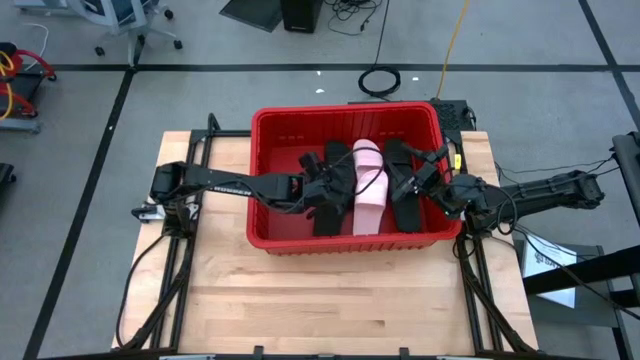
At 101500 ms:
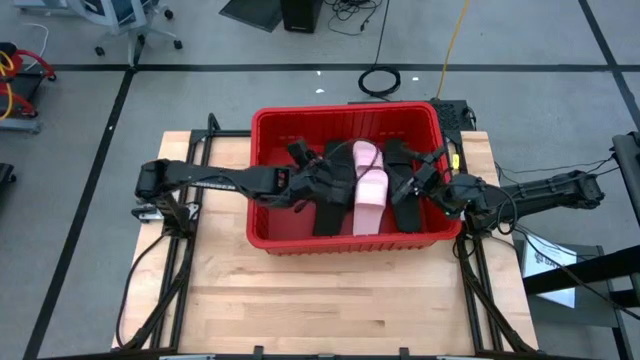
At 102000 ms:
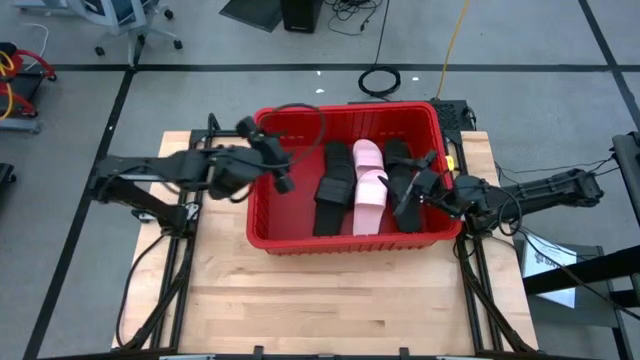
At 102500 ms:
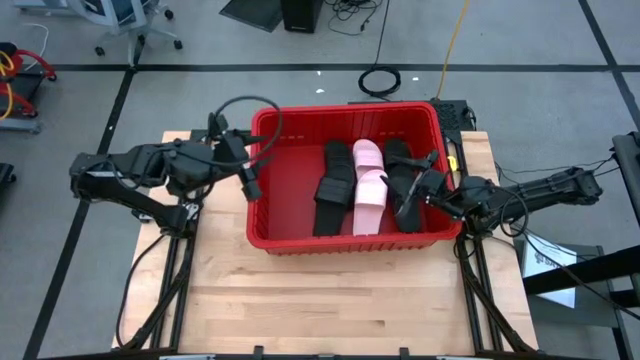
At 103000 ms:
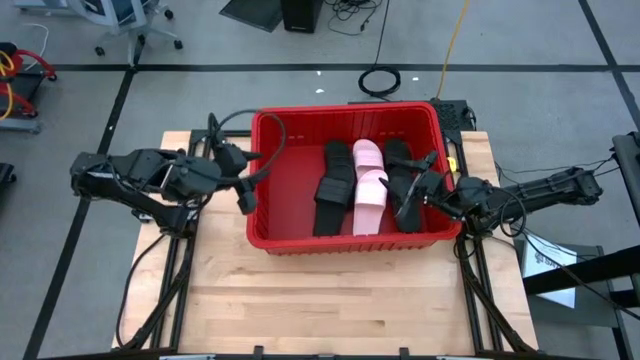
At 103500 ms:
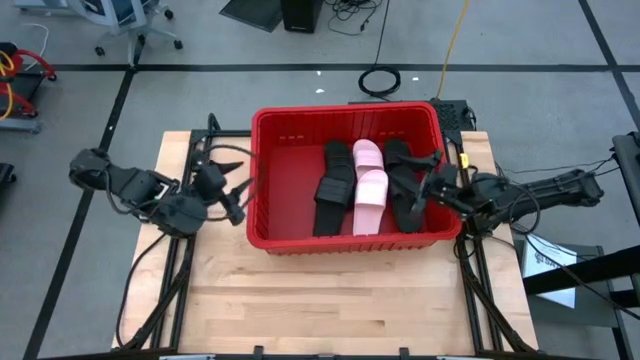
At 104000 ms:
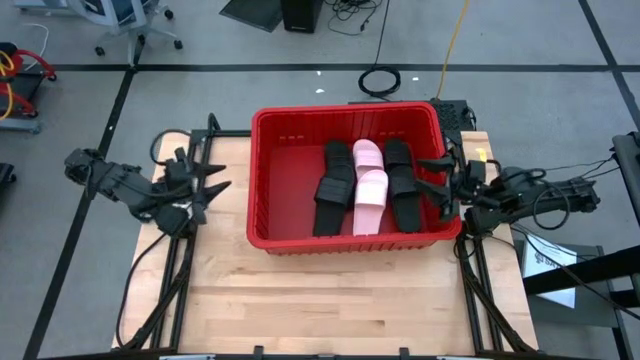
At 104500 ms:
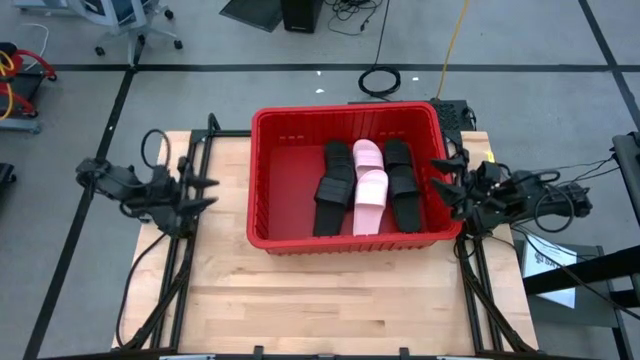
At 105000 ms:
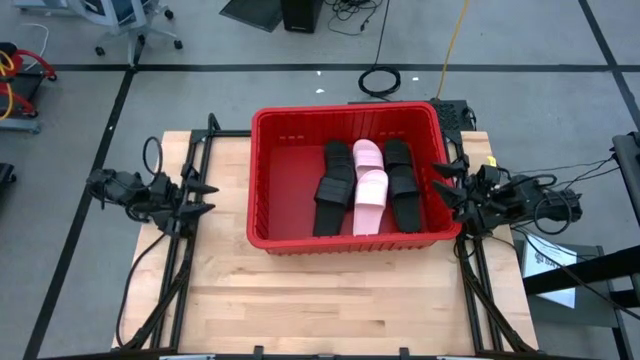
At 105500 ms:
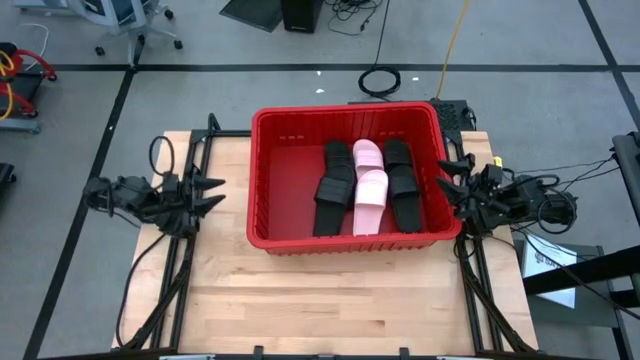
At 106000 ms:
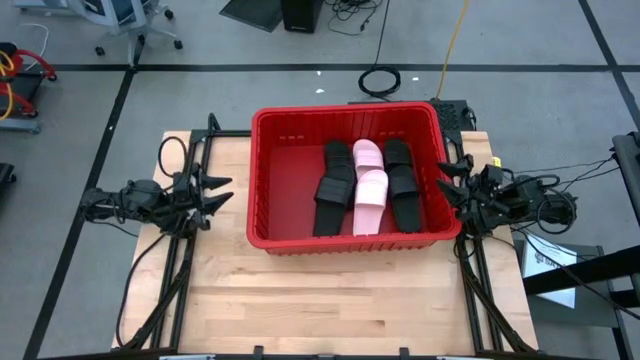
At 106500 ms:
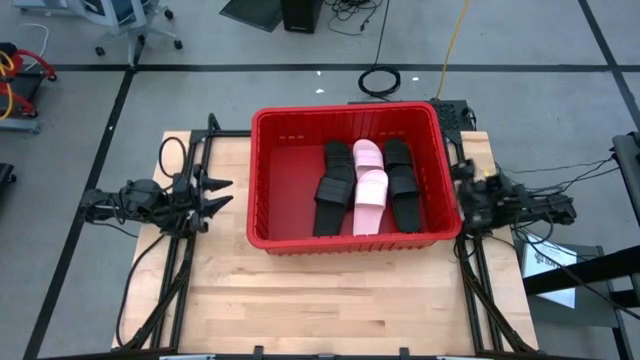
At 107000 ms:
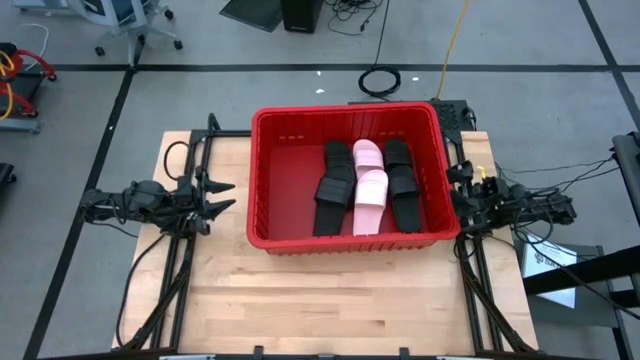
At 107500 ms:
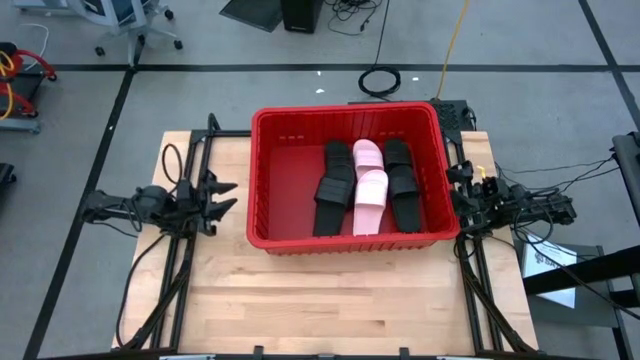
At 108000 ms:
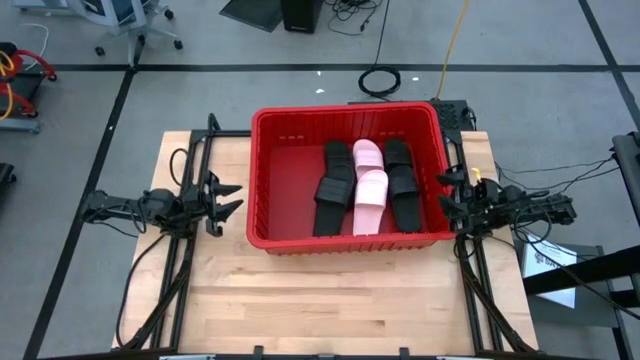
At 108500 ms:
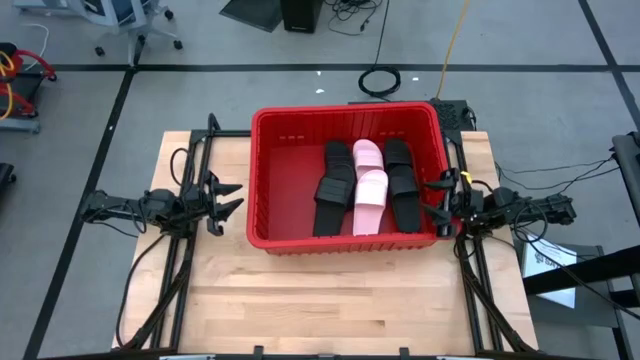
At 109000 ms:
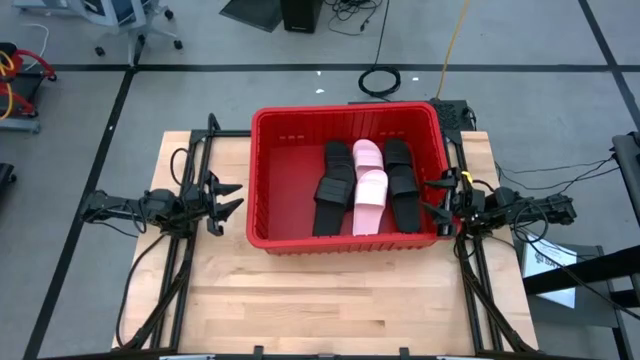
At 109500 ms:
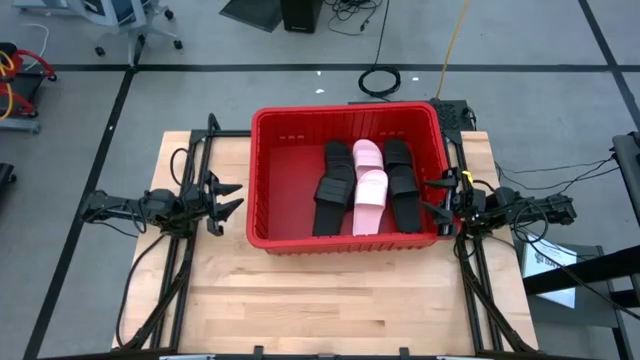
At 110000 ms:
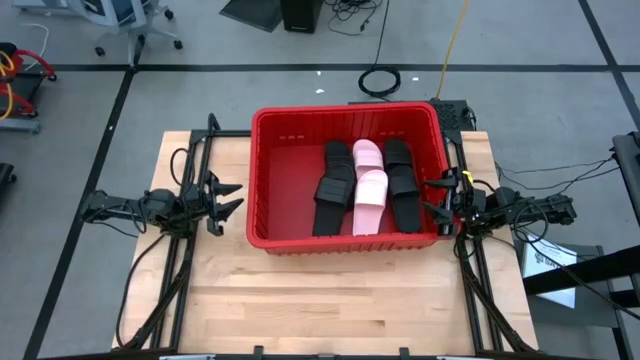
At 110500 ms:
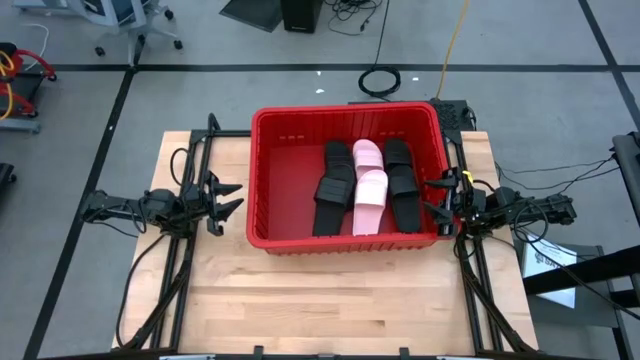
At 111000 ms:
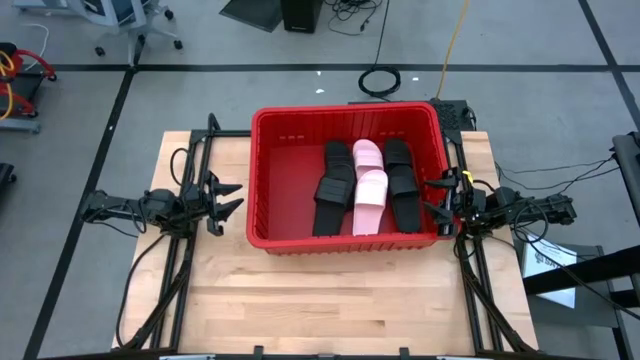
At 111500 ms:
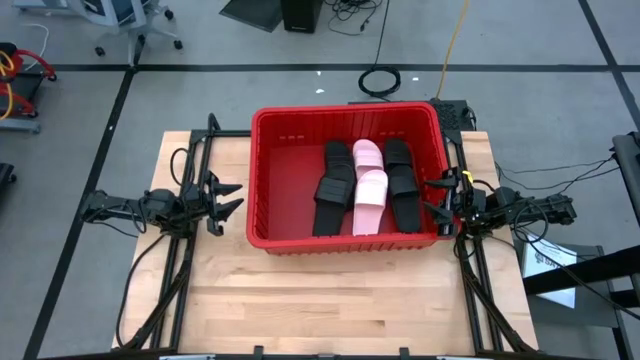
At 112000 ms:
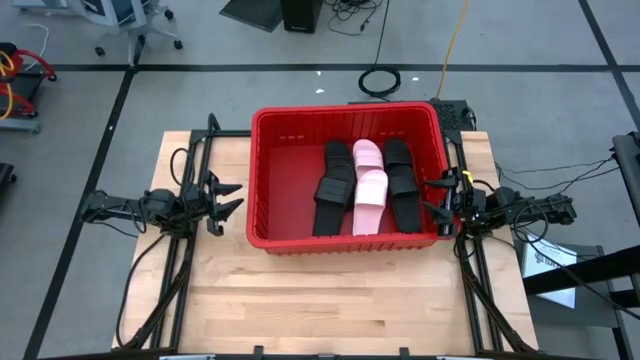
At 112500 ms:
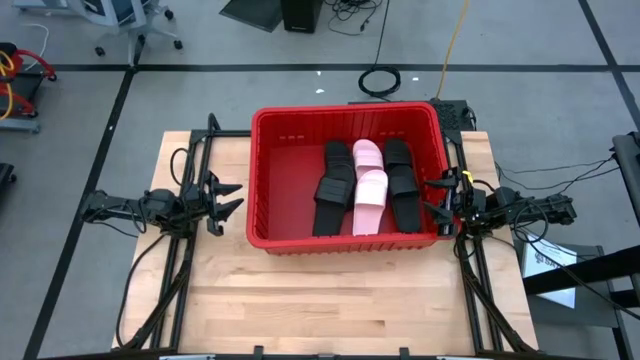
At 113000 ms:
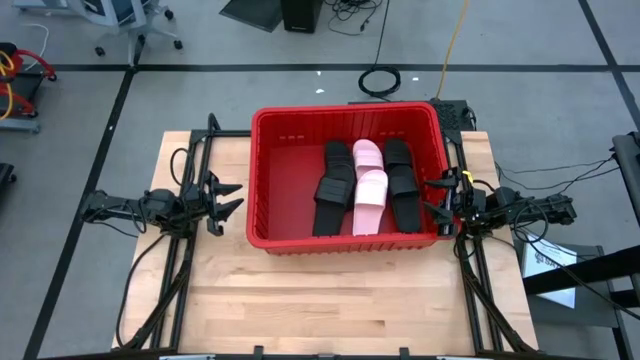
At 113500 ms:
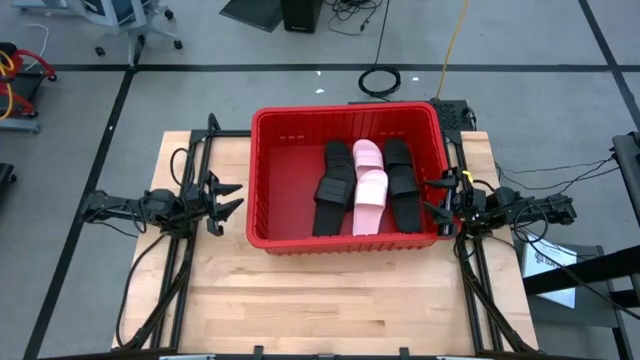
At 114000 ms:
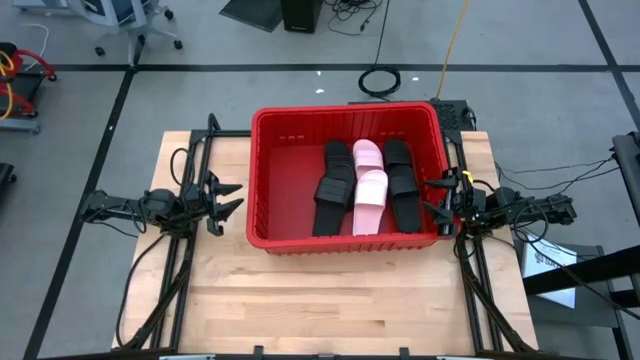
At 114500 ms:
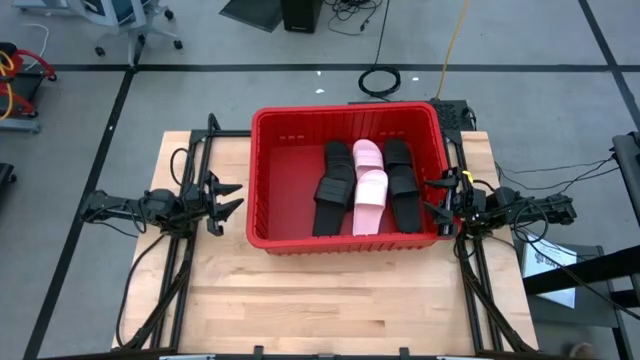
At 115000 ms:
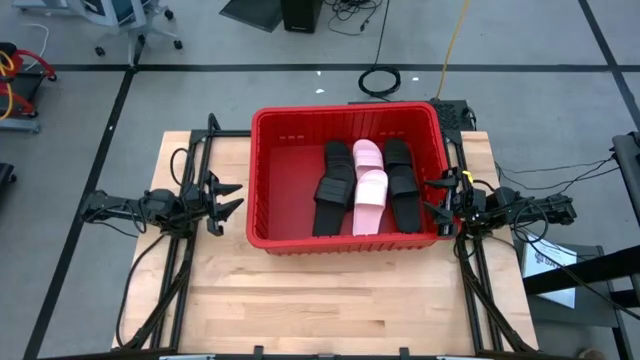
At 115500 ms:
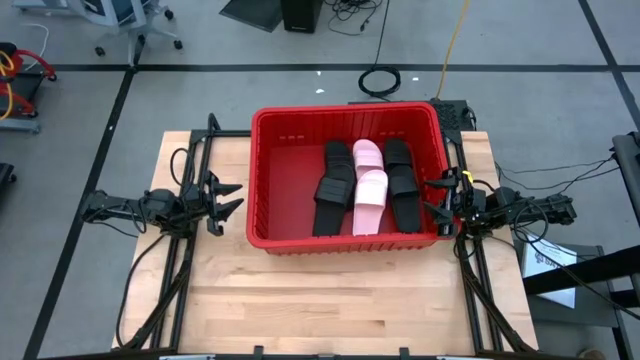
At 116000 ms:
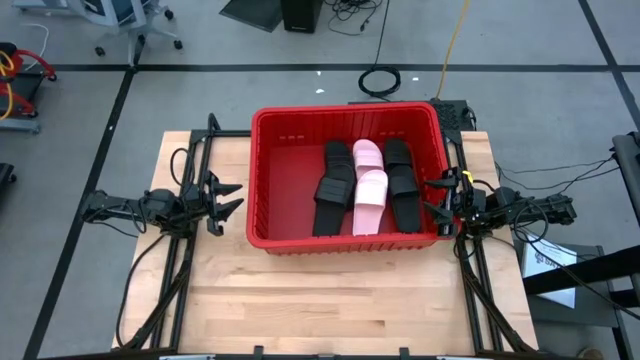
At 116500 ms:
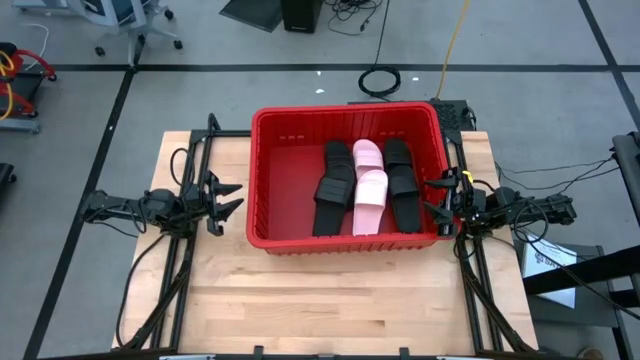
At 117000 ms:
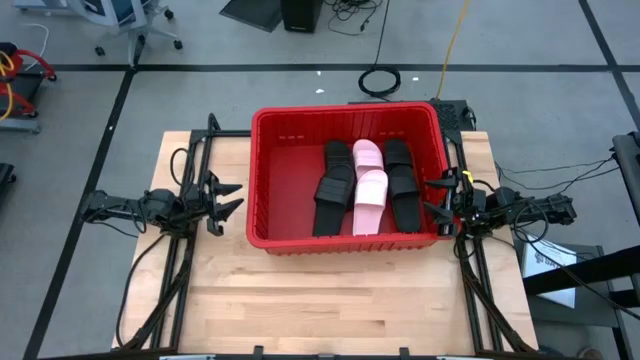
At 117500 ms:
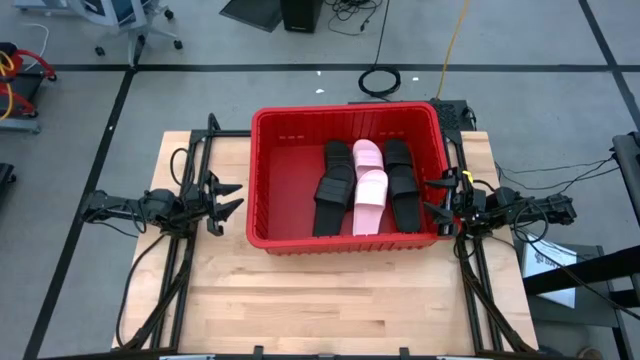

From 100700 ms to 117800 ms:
Task: Pick and place slides into bin
Return to Home Position

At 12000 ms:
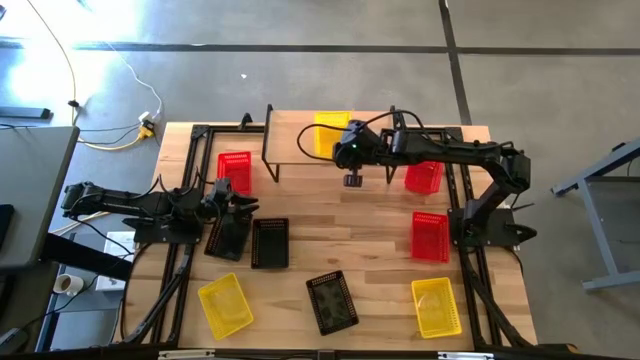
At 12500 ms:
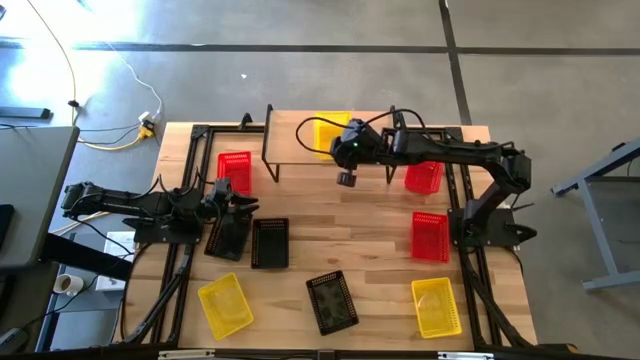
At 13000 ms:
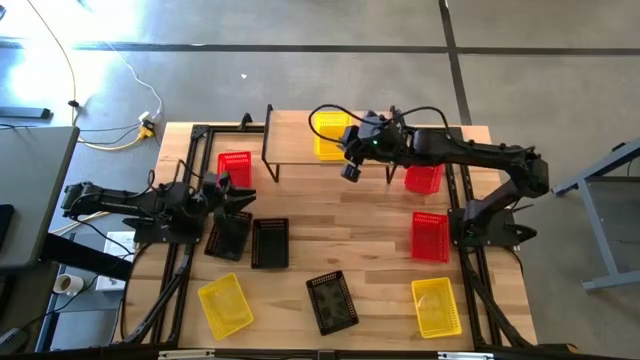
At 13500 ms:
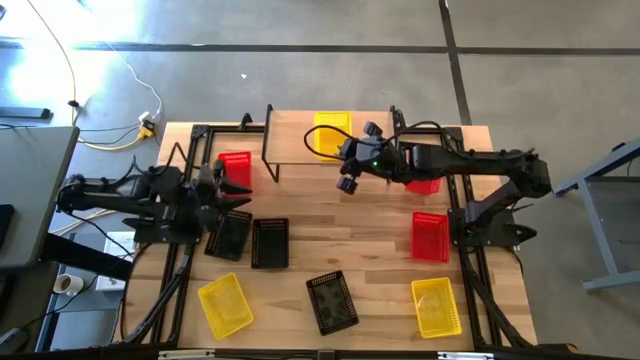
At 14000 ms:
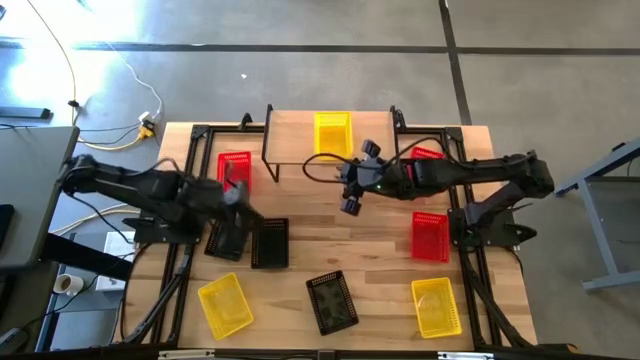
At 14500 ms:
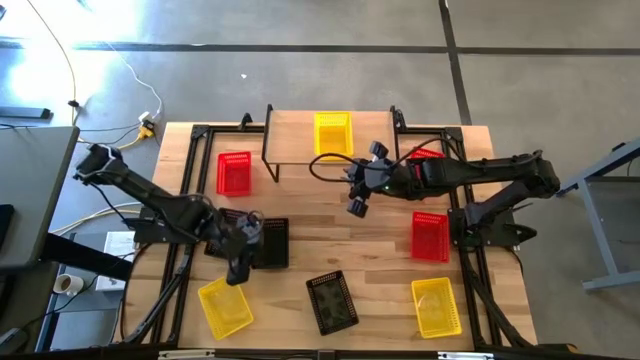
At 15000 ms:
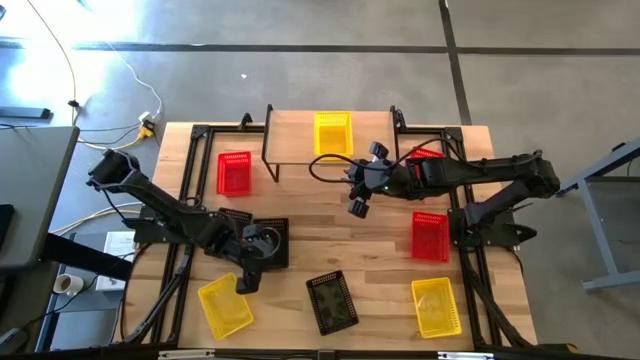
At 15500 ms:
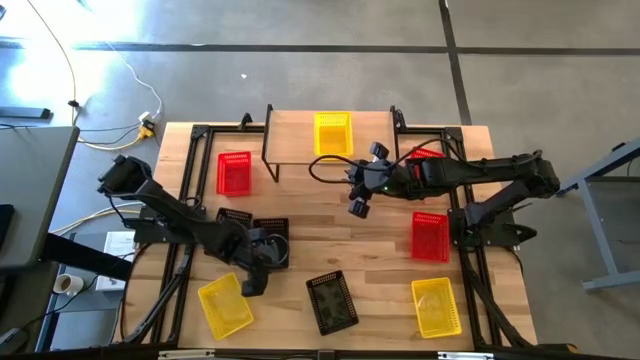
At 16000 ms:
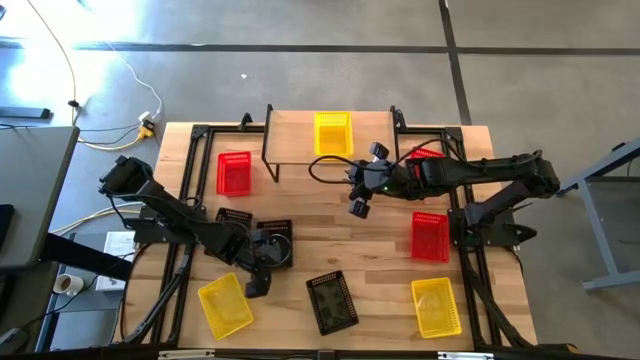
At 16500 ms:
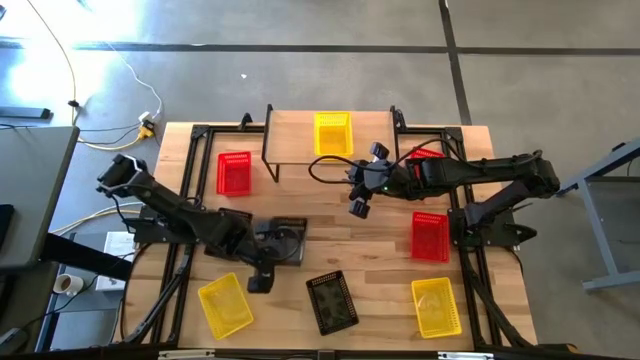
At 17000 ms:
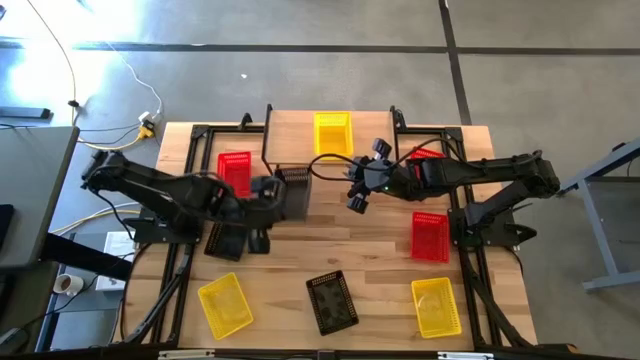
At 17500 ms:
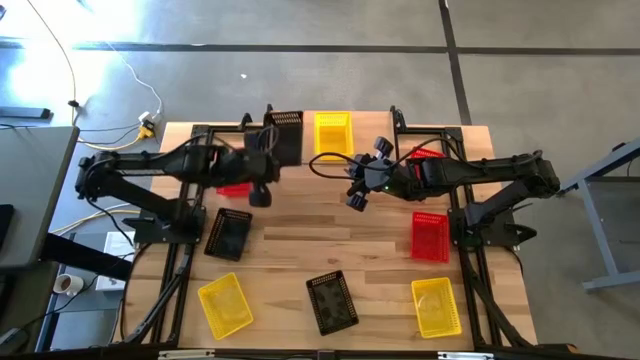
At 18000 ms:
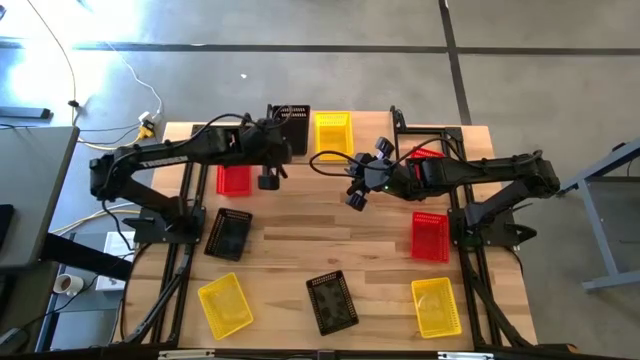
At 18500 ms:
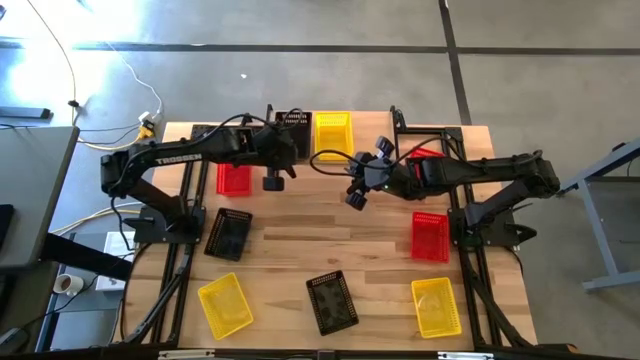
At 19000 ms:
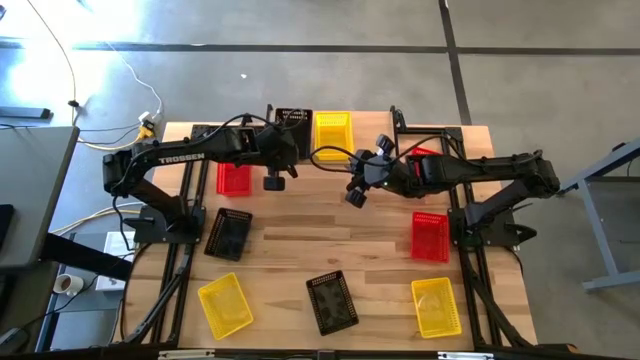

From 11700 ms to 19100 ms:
Task: Stack baskets on shelf by color
Put the middle black bin on the shelf
